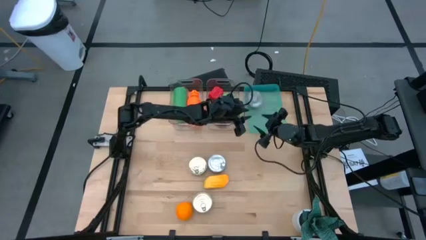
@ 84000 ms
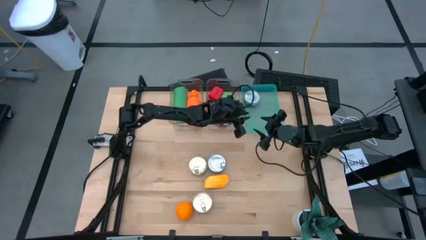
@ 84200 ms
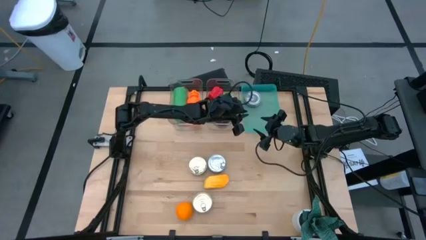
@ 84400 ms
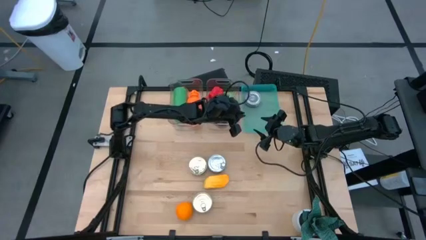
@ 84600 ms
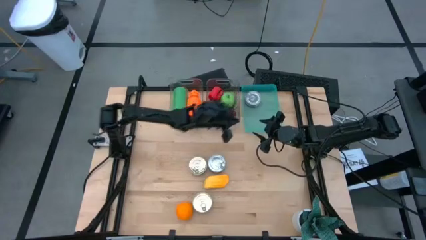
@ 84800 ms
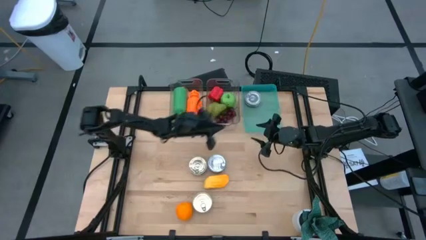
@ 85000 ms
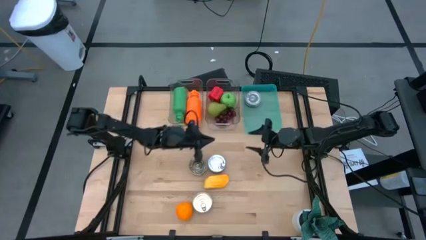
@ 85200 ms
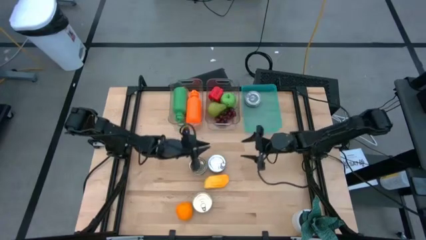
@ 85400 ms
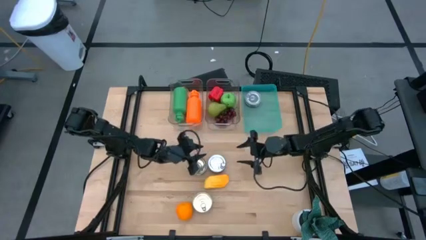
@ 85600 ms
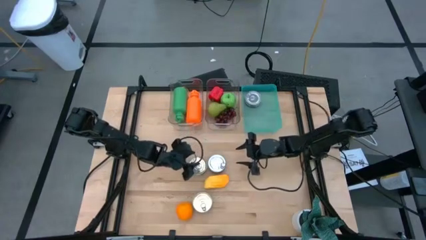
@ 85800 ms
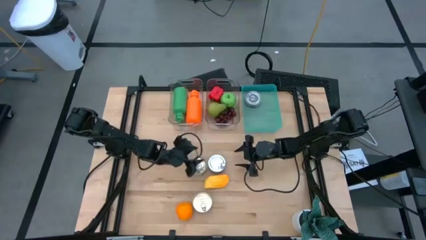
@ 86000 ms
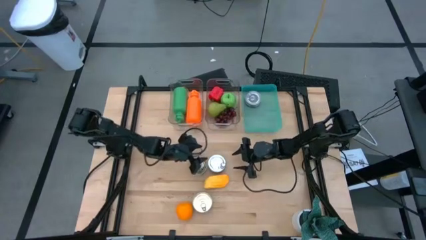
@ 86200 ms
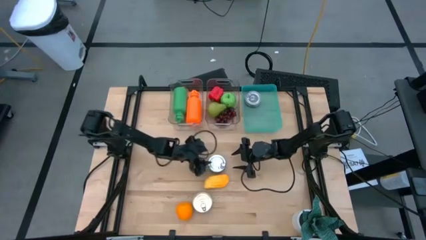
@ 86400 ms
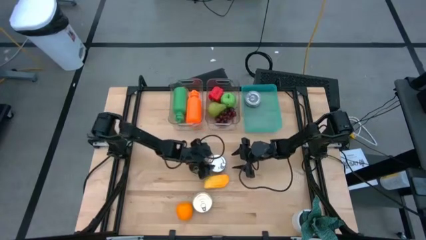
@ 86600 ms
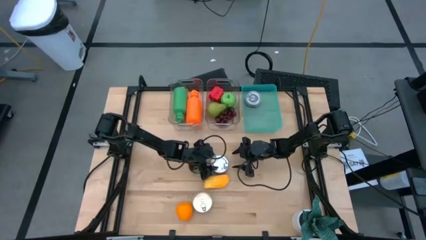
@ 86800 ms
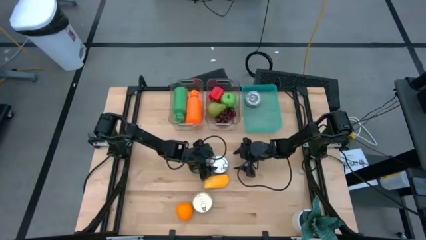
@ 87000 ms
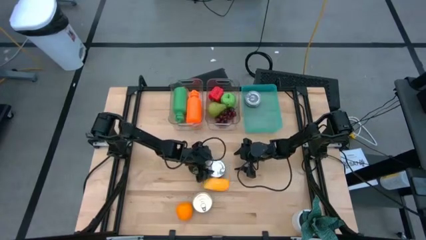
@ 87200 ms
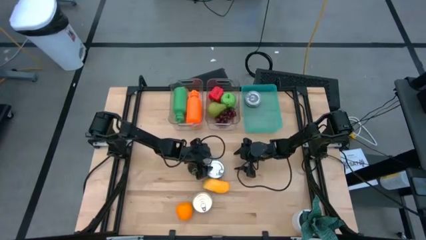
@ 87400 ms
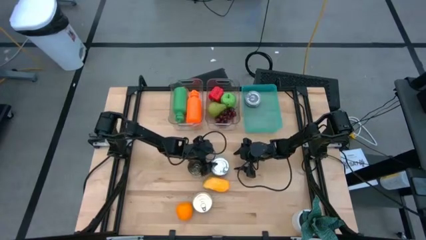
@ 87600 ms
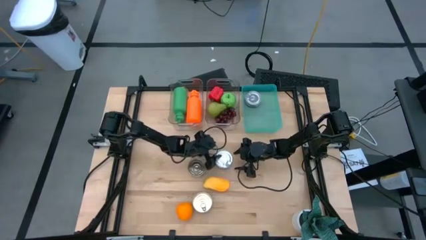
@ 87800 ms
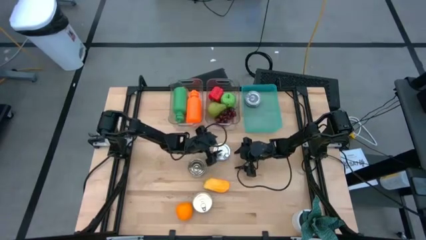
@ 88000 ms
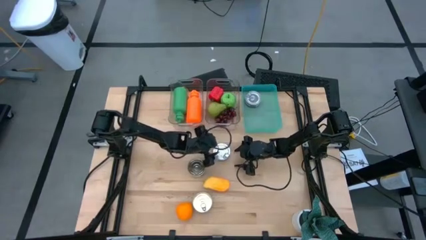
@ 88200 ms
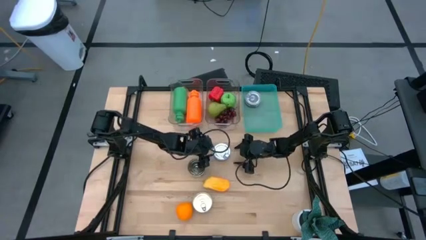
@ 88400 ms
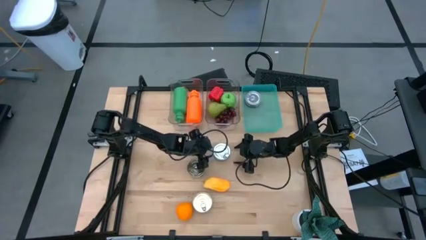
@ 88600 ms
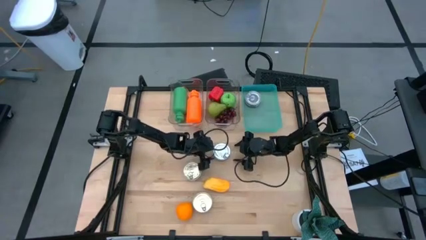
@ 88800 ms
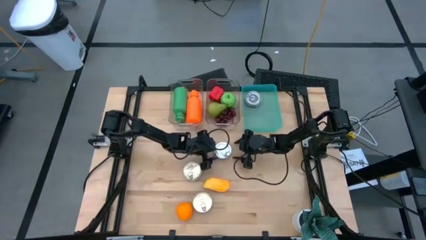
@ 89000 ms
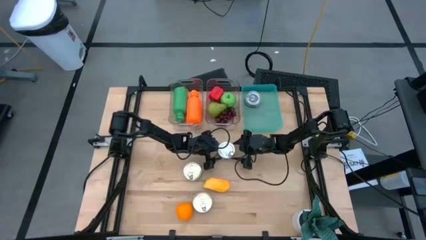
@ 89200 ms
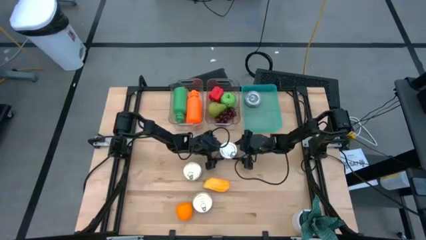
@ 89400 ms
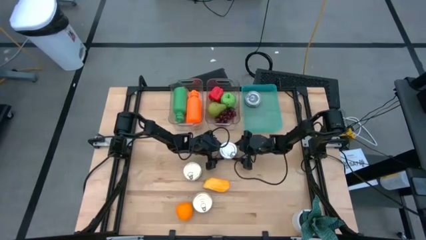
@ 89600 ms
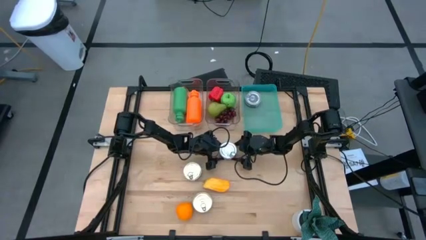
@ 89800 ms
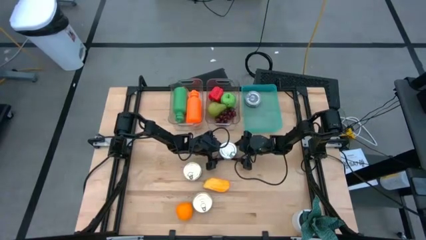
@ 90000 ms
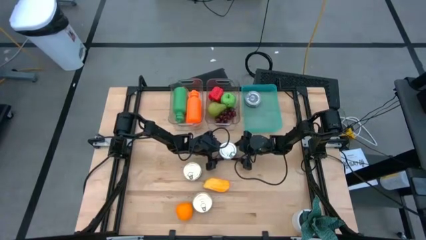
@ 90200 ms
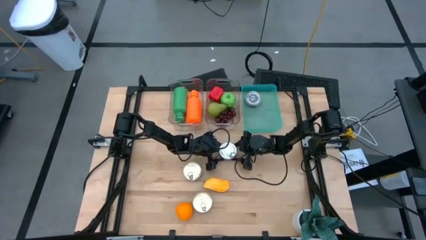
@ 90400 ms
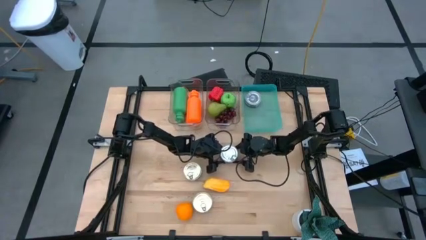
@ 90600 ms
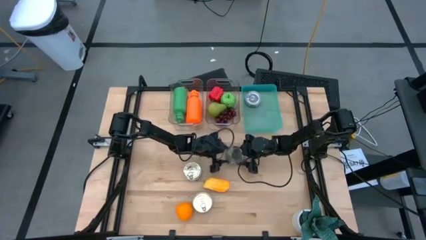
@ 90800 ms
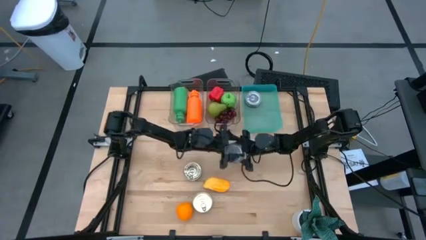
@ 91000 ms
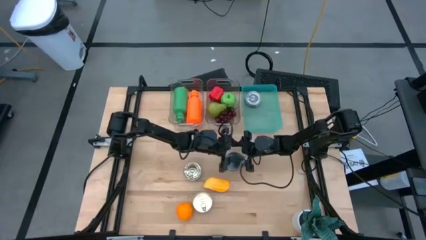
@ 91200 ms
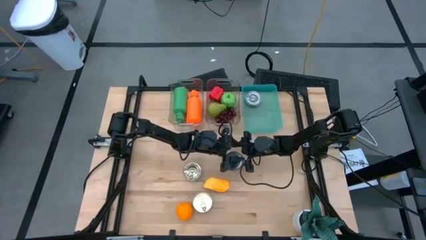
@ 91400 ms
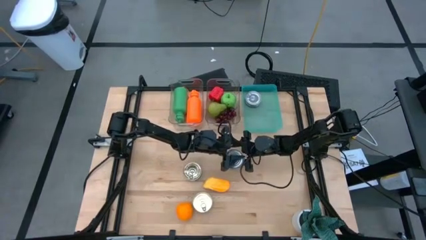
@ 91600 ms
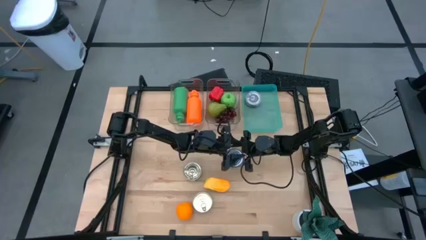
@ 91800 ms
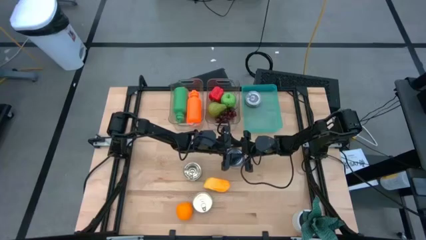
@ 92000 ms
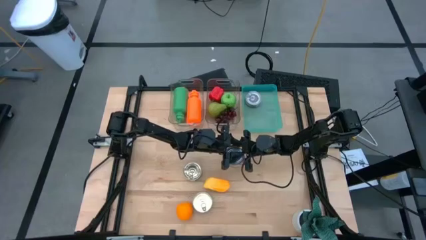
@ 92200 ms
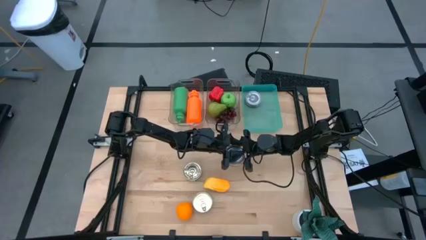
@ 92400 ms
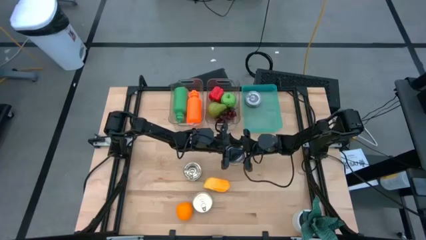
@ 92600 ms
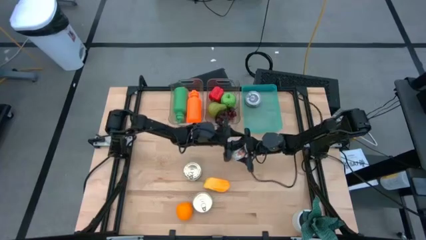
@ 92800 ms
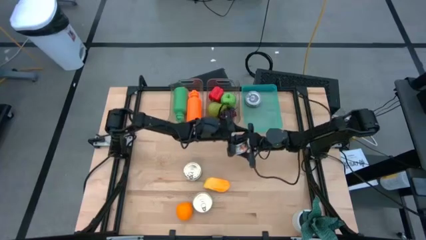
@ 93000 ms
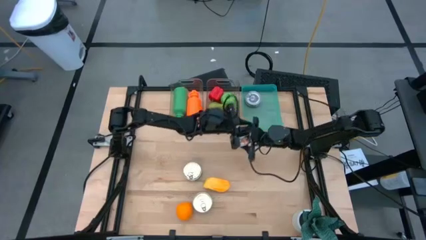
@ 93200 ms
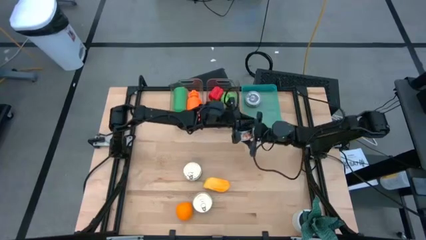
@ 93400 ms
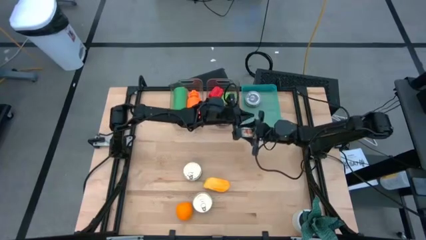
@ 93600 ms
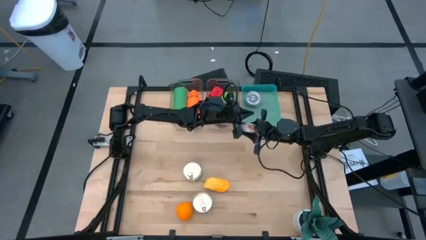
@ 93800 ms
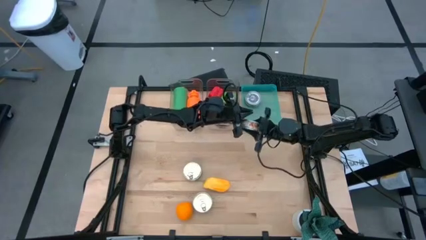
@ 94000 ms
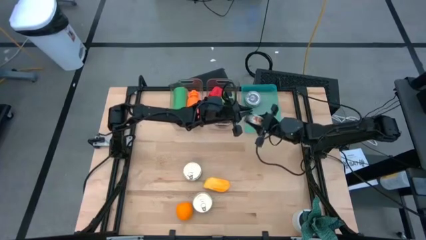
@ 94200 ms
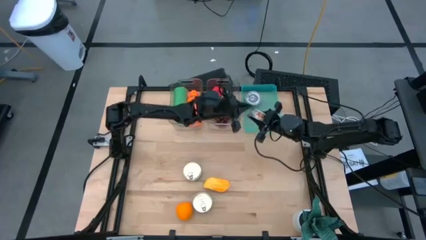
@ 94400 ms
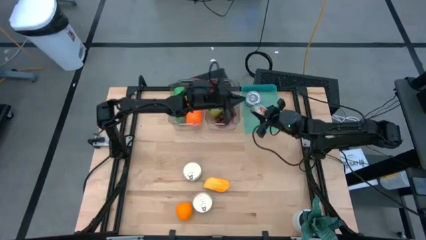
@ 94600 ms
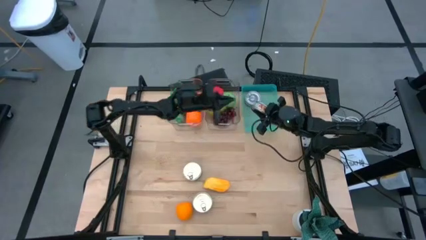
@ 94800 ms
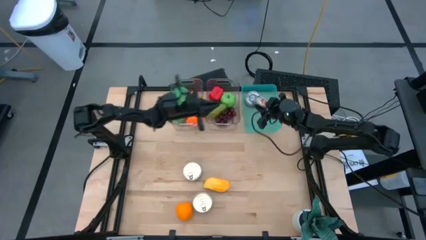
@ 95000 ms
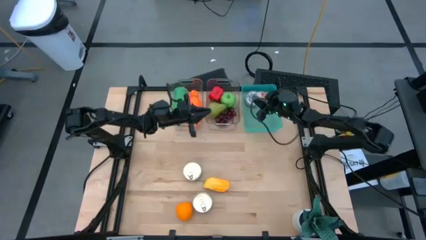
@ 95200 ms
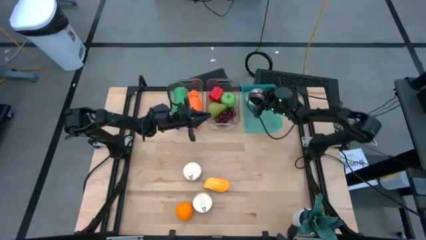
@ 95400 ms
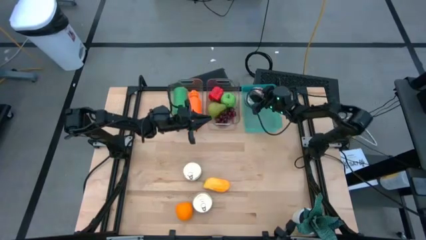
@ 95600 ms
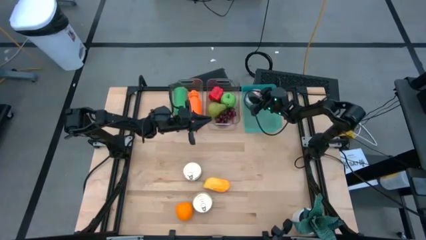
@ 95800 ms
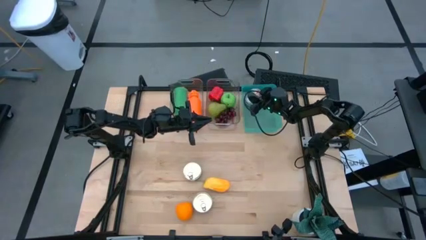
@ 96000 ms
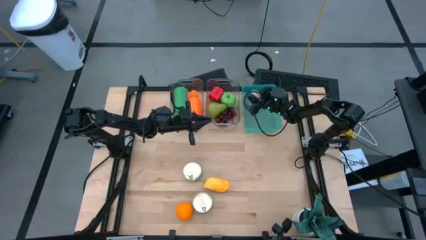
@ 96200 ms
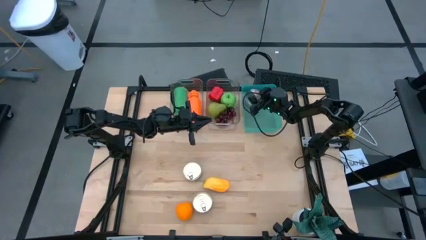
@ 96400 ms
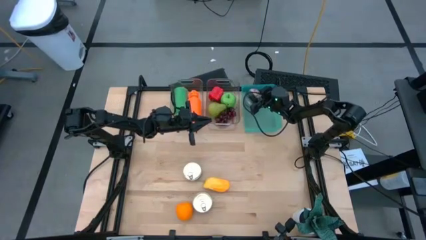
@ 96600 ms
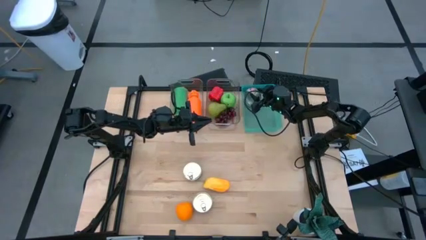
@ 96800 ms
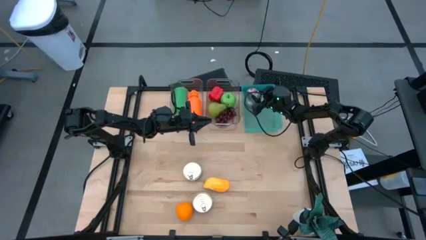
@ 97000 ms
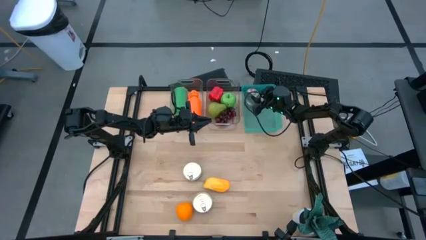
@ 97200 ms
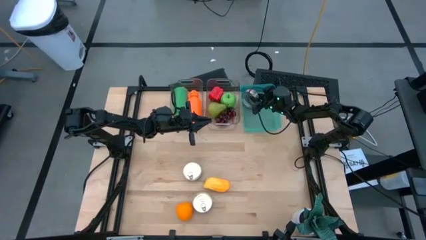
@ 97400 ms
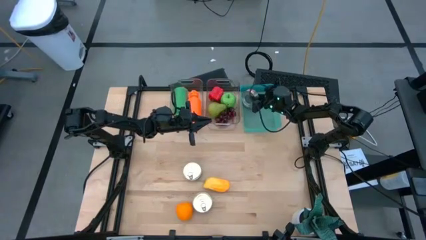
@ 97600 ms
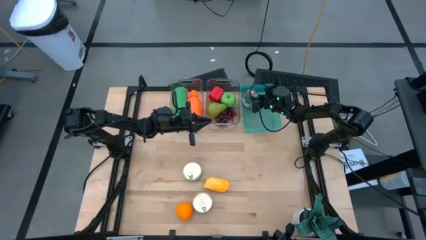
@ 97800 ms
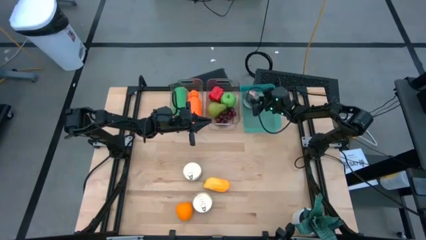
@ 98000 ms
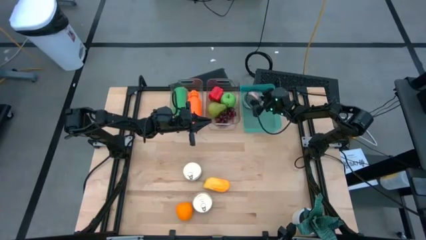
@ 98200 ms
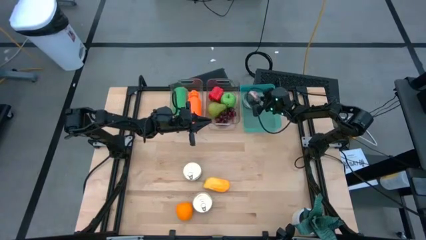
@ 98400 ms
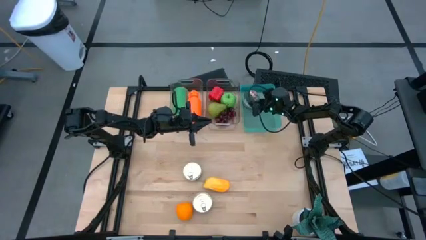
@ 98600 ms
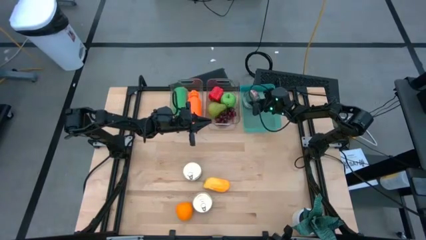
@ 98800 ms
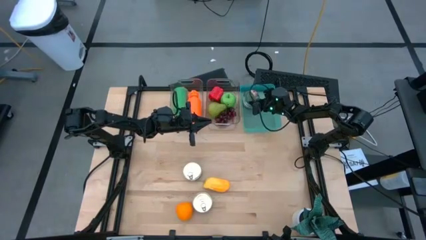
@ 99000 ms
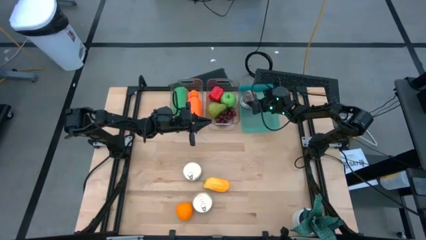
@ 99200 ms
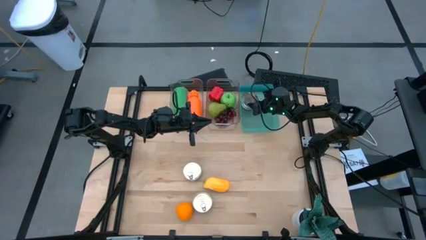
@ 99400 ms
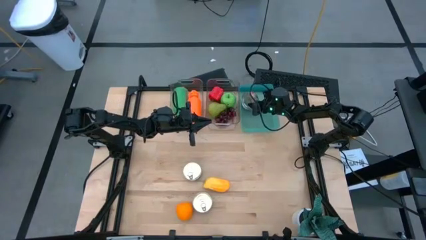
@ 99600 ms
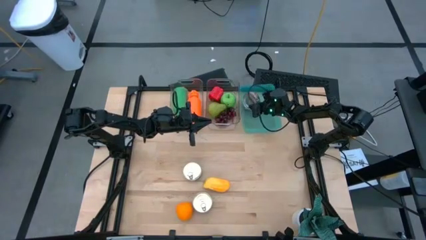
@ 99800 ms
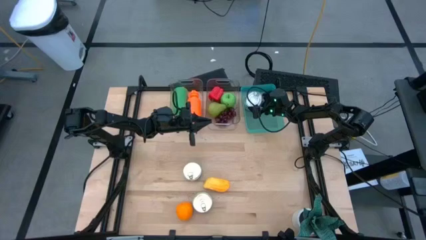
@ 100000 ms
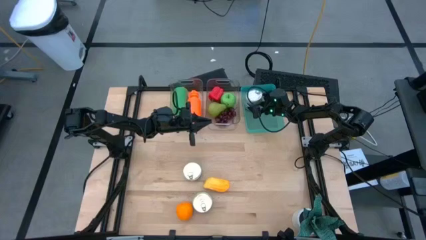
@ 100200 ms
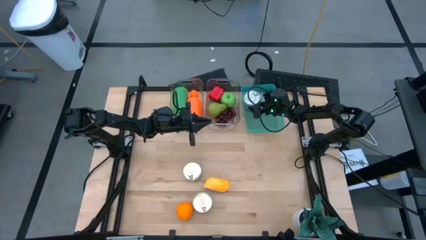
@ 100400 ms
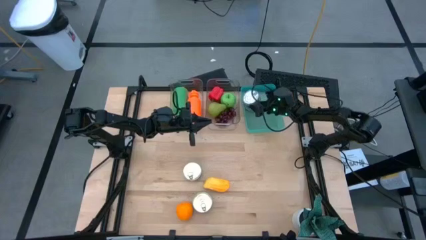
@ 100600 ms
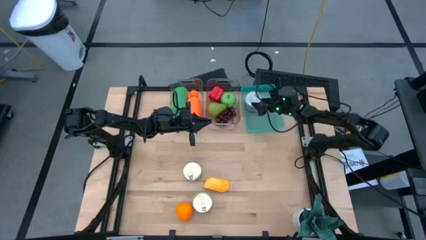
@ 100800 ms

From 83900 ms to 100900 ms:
Task: Pick & Place Food Item
Put the green tuna can into the green bin
